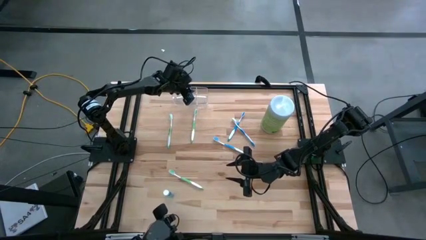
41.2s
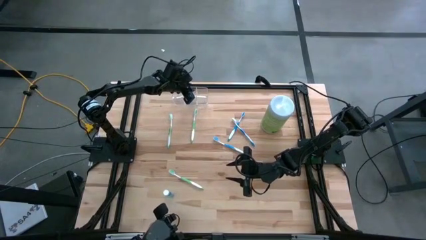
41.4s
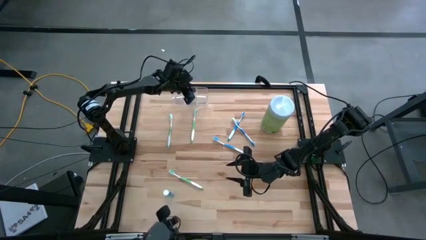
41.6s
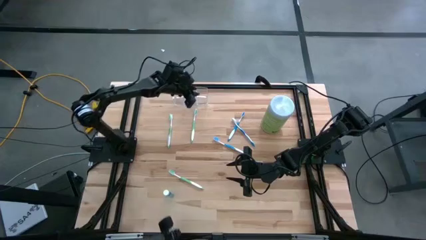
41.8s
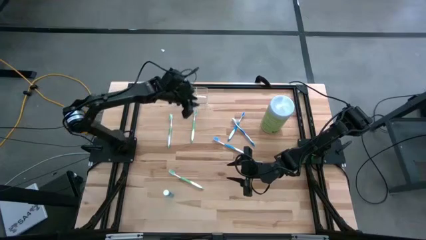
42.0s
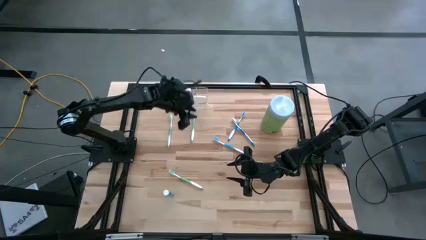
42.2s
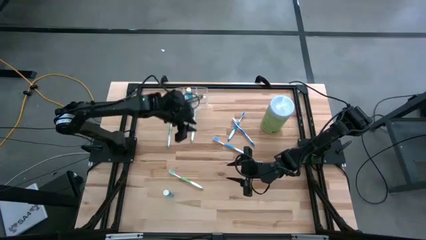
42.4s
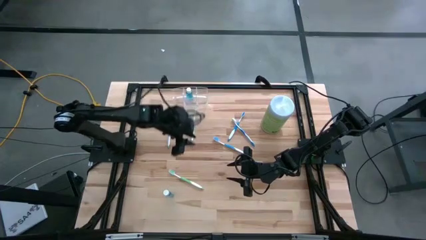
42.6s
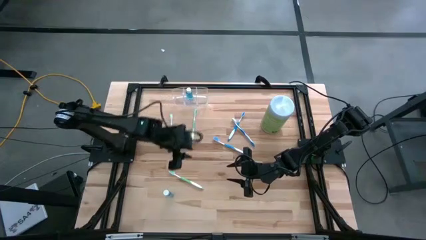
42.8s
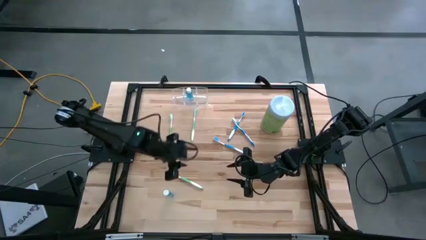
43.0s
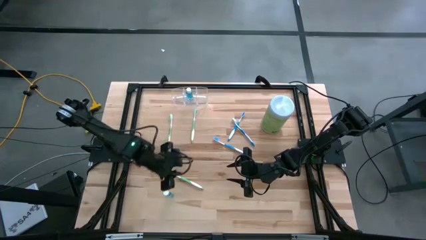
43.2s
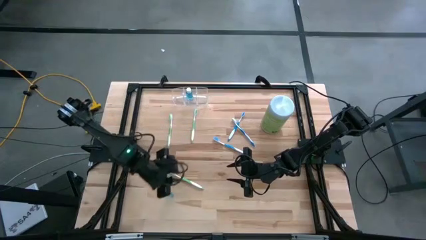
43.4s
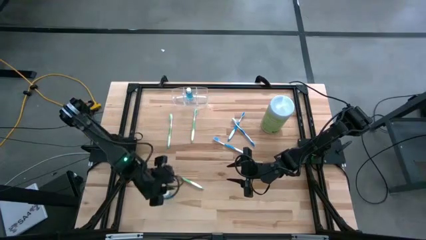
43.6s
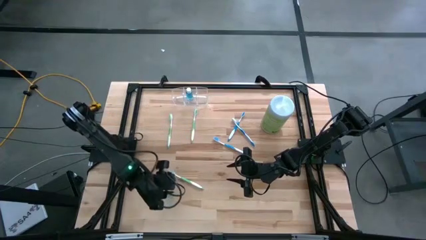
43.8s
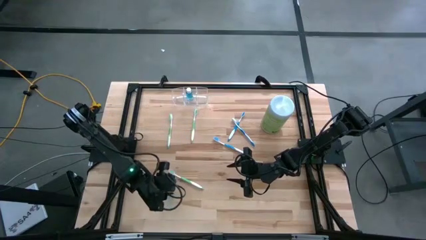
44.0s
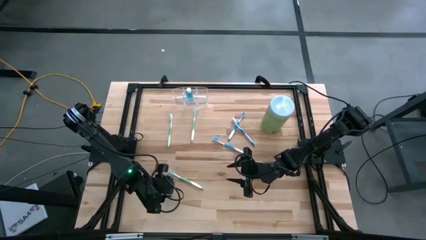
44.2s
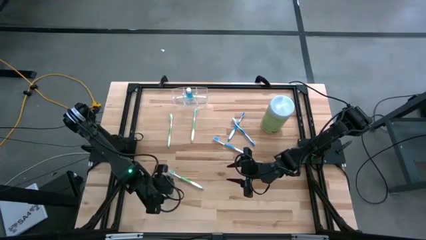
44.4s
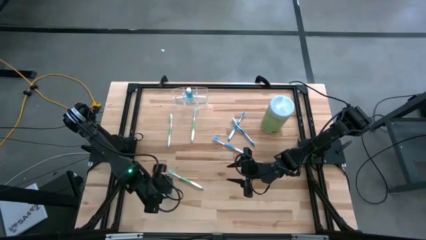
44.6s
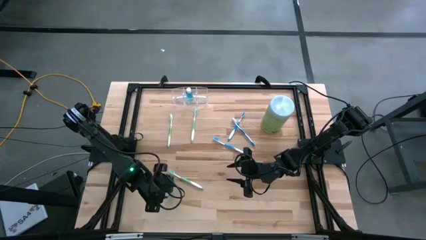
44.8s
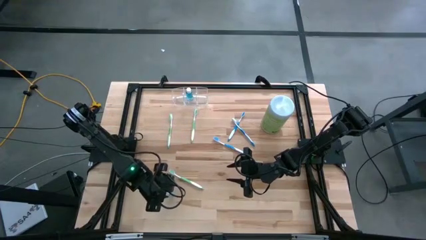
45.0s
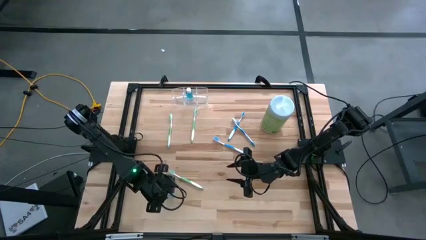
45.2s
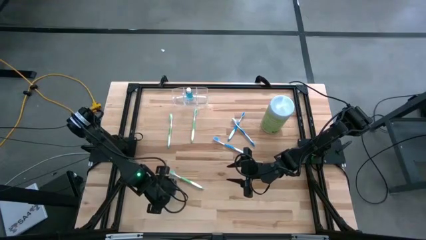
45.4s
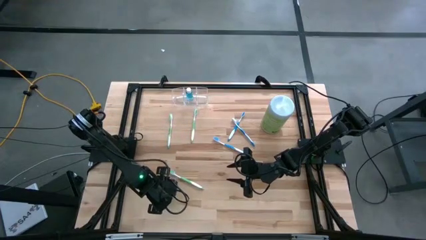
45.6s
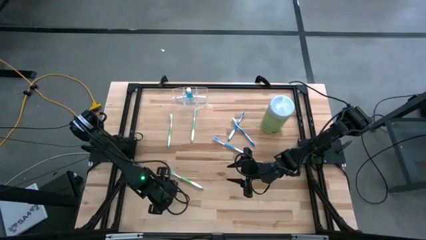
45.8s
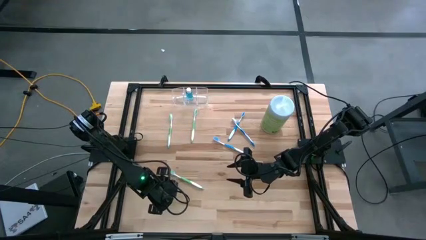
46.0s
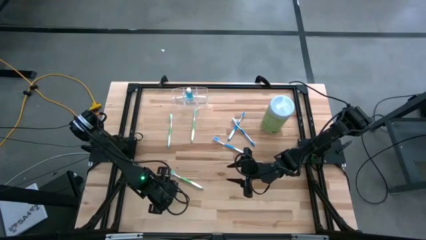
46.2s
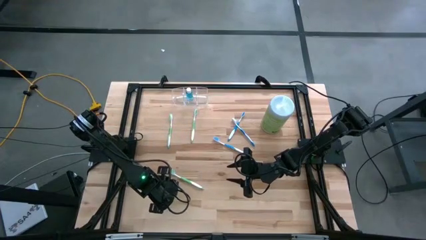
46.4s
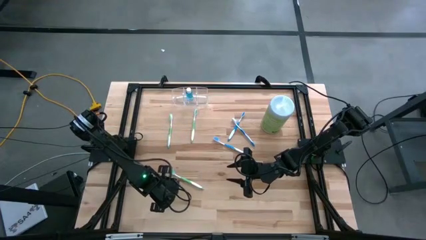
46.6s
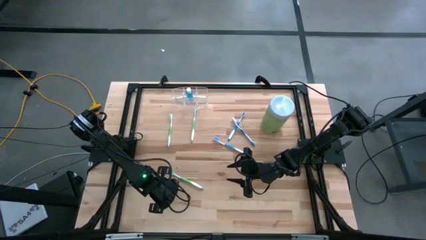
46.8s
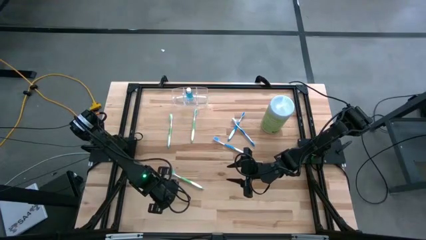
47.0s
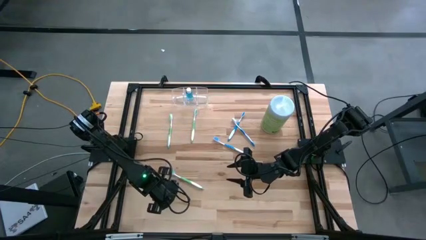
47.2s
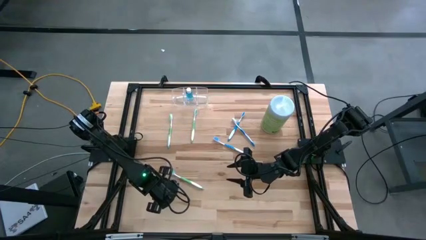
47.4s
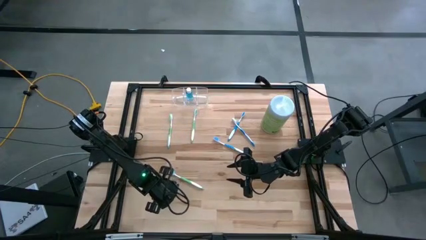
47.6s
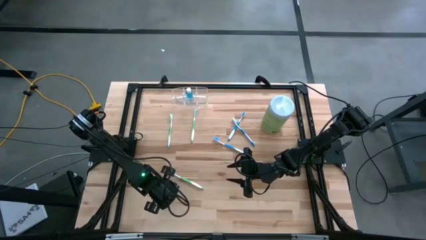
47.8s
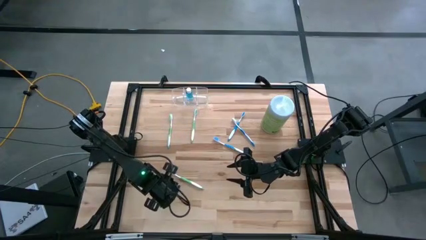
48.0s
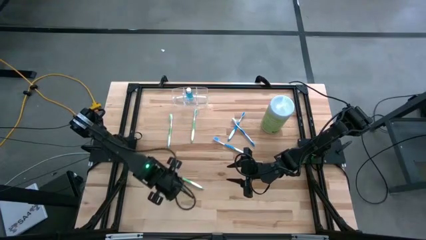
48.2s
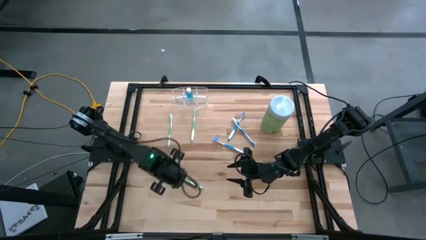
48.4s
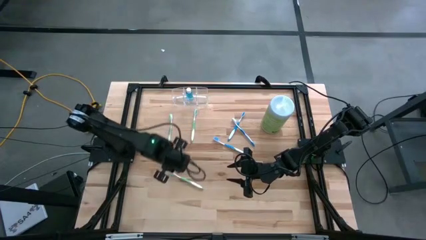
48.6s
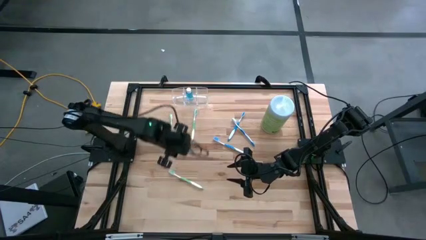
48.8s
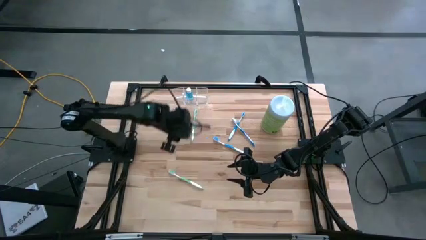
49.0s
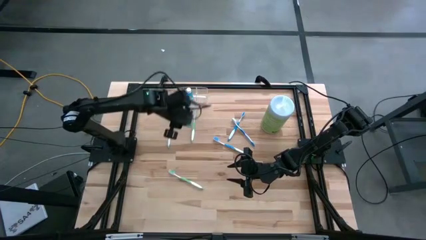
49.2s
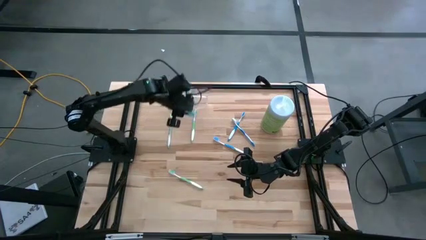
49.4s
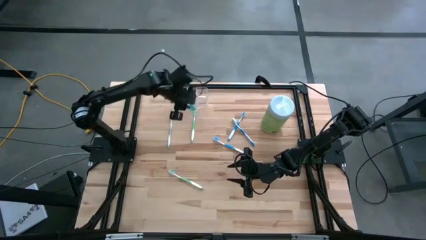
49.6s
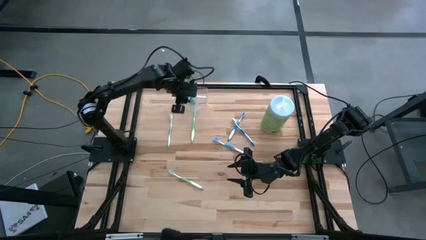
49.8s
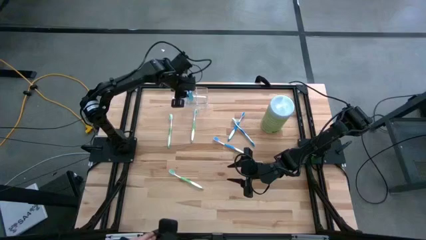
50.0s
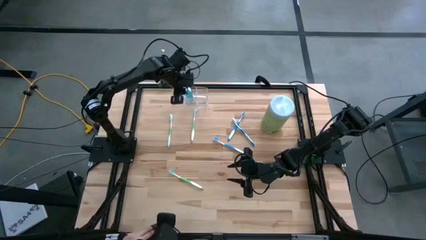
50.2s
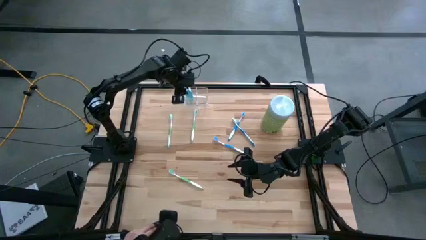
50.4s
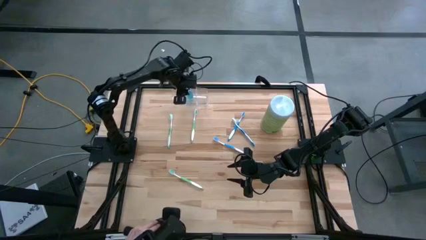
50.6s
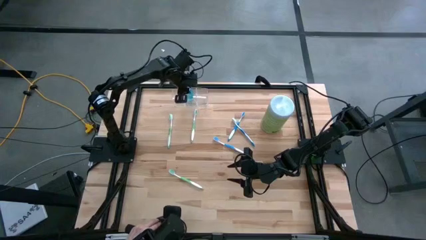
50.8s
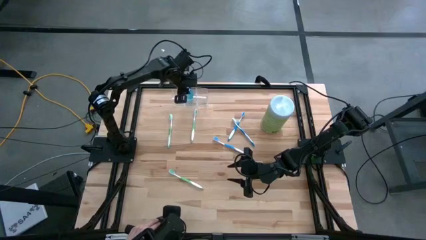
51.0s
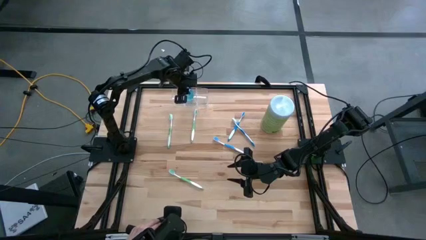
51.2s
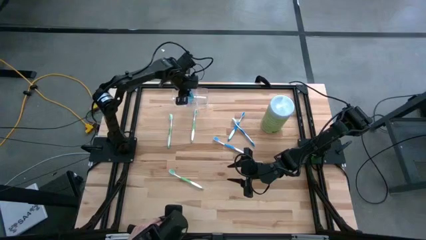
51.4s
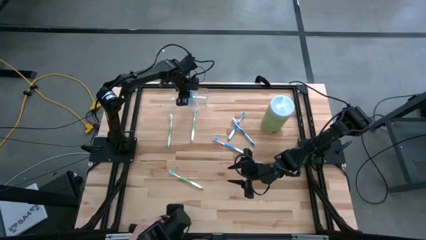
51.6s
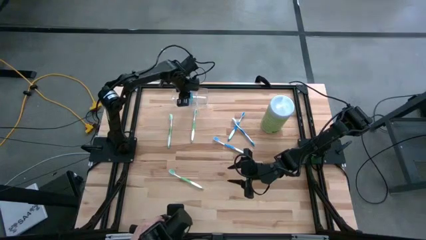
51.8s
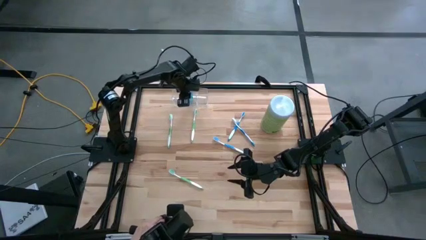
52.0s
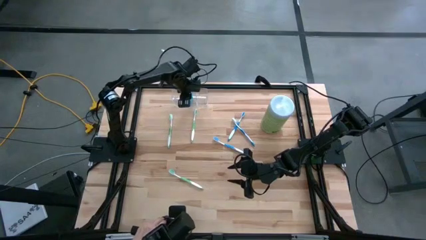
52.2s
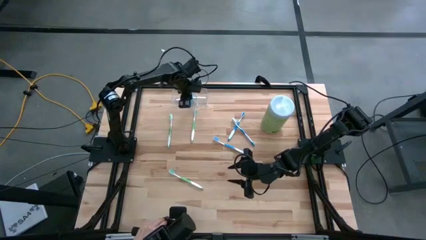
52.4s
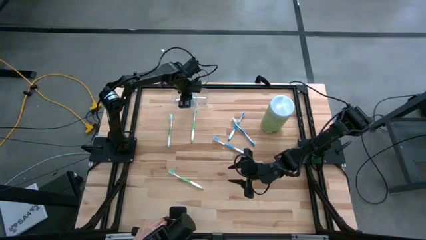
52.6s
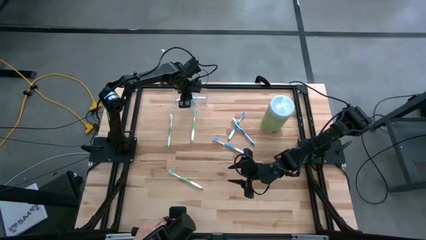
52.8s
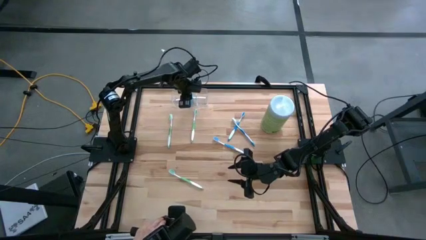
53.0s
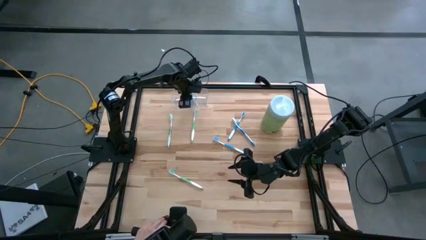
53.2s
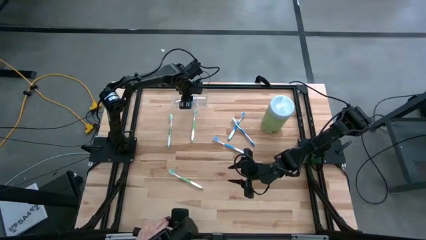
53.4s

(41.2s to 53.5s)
Task: Pick & Place toothbrushing station
Put the blue mouthwash into the middle section of the transparent organizer
